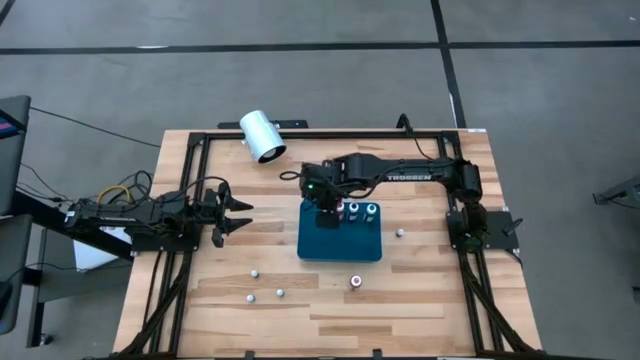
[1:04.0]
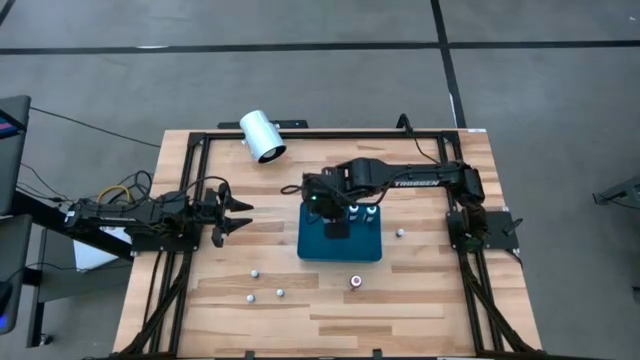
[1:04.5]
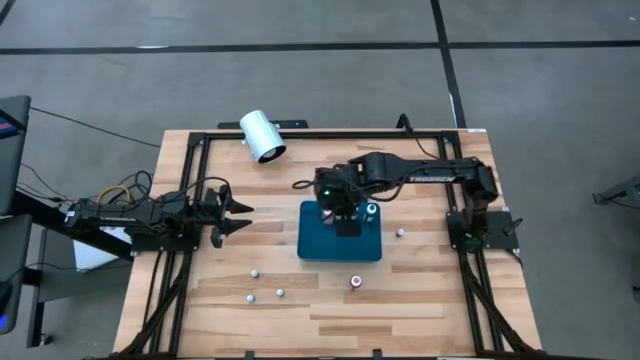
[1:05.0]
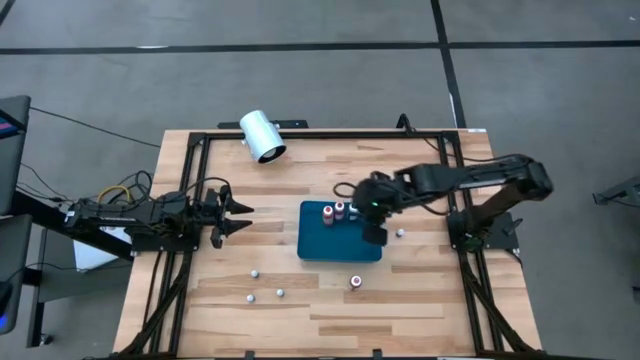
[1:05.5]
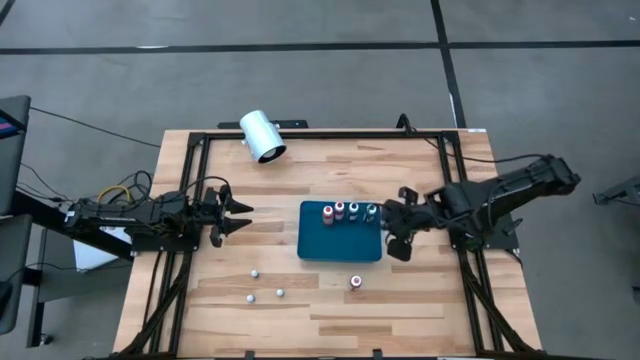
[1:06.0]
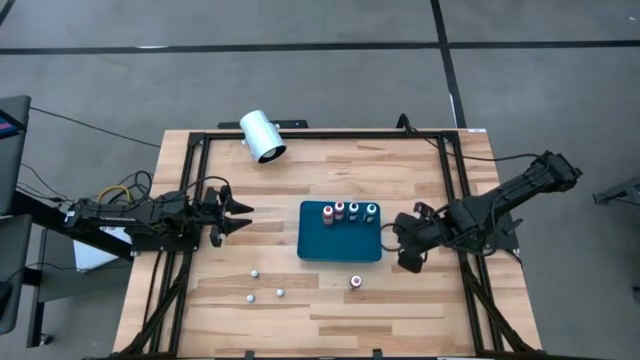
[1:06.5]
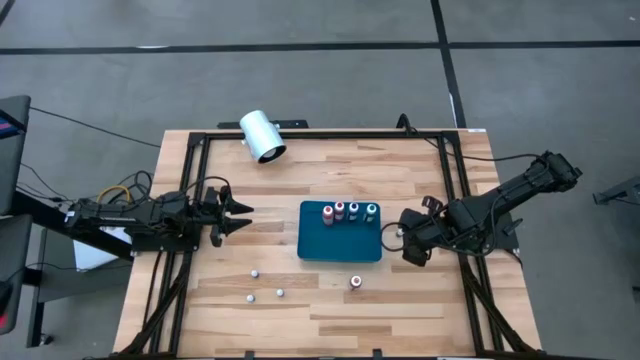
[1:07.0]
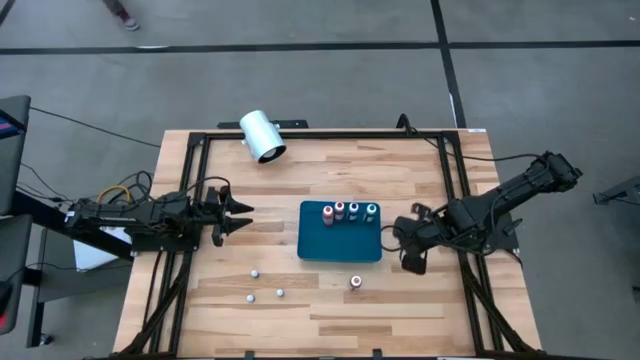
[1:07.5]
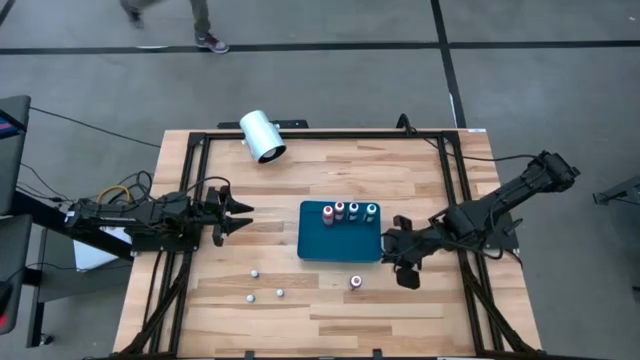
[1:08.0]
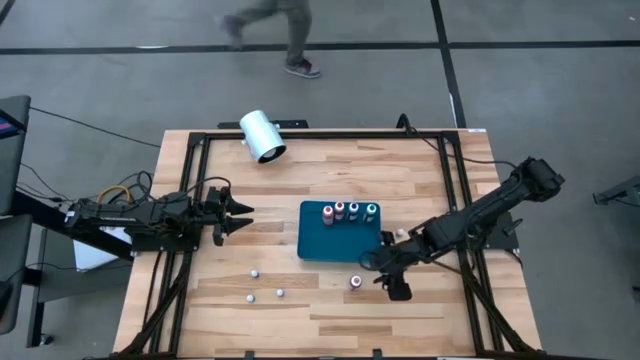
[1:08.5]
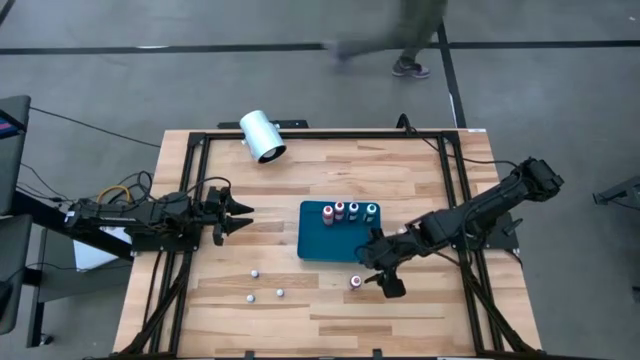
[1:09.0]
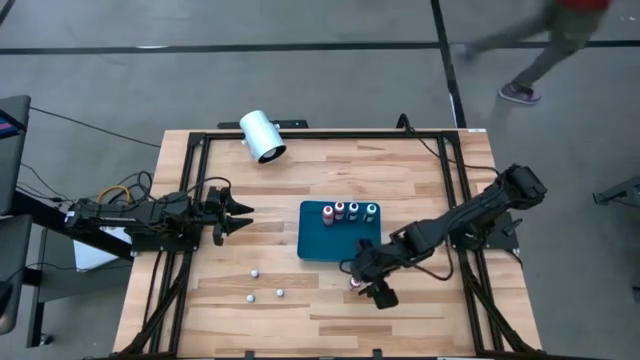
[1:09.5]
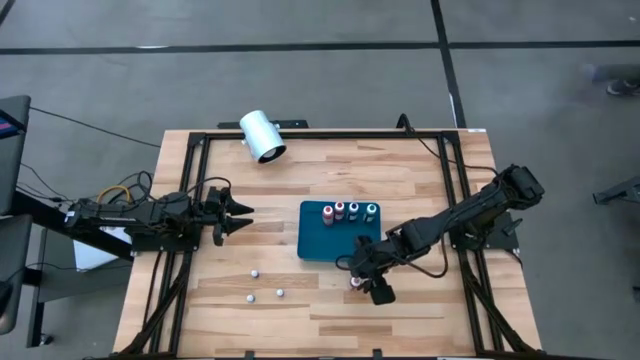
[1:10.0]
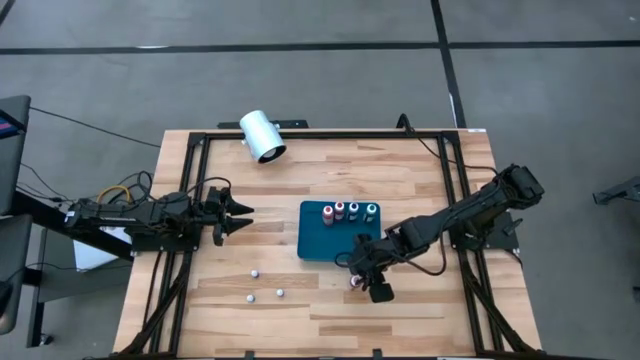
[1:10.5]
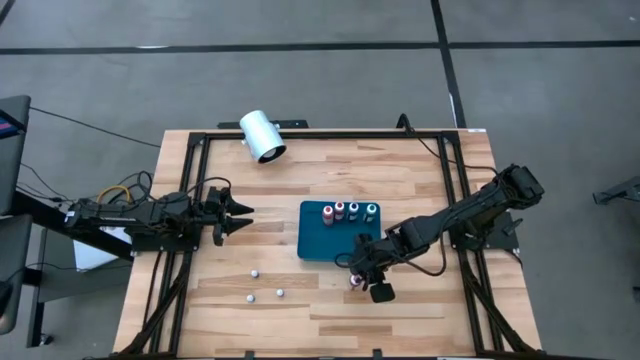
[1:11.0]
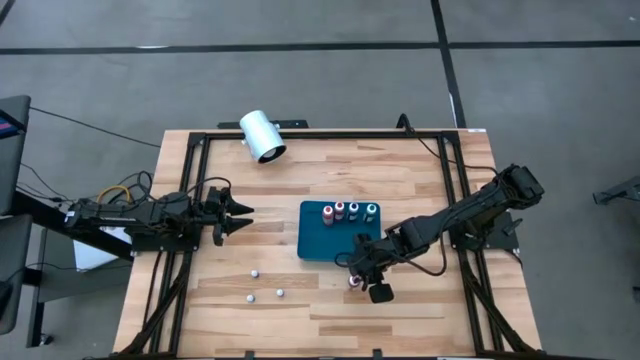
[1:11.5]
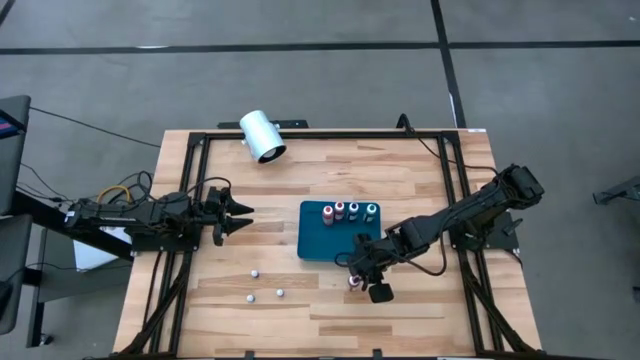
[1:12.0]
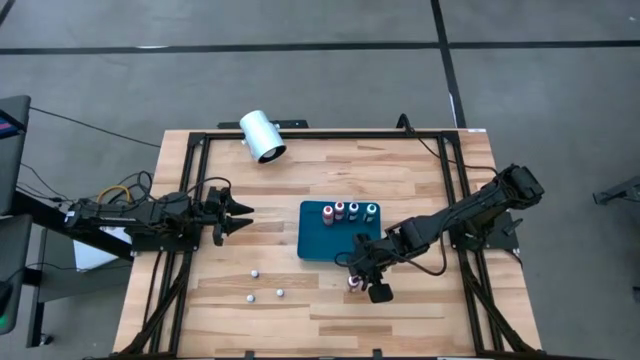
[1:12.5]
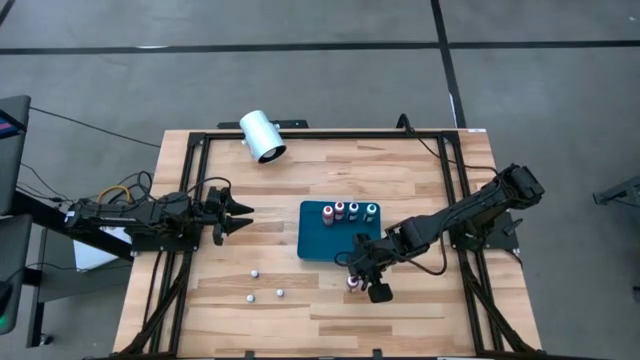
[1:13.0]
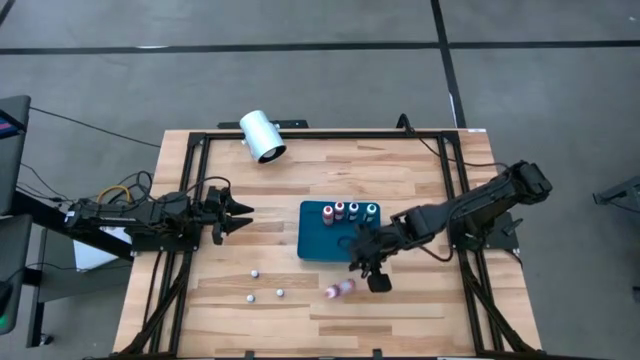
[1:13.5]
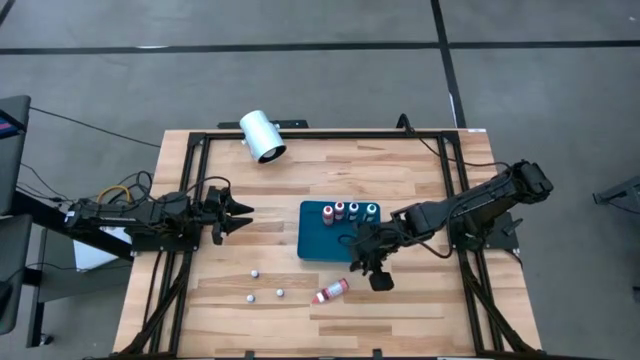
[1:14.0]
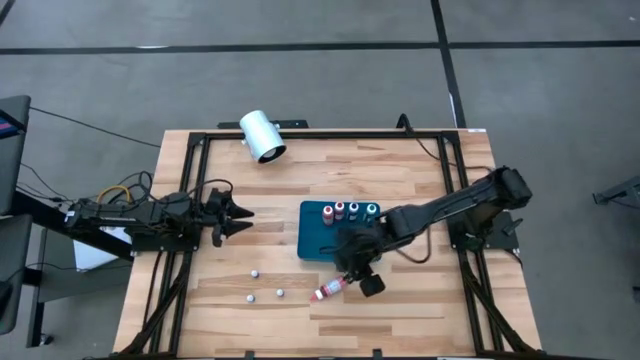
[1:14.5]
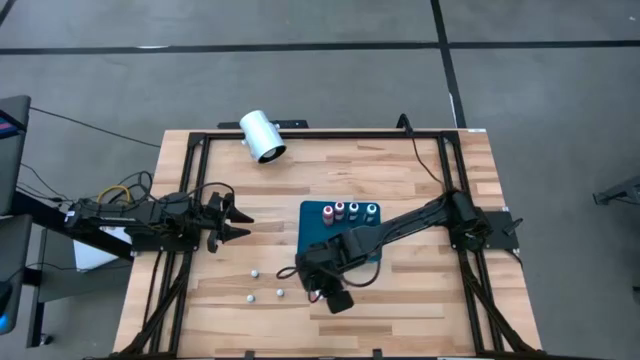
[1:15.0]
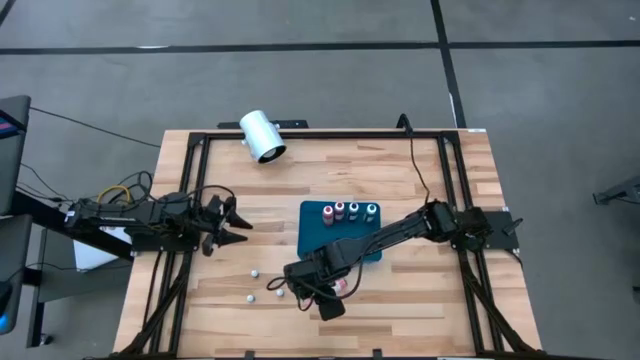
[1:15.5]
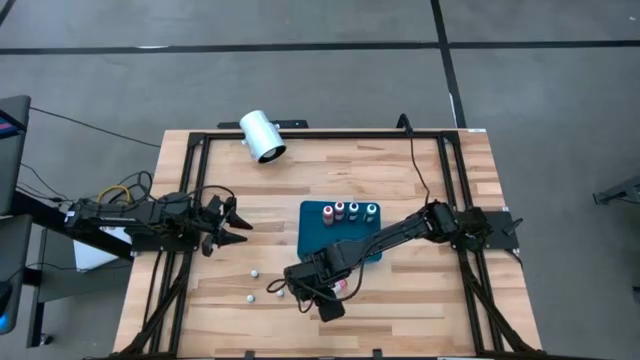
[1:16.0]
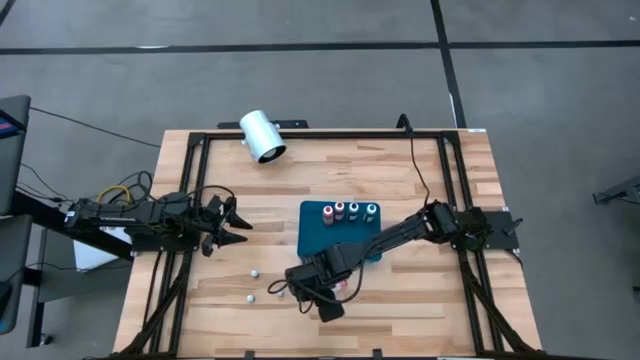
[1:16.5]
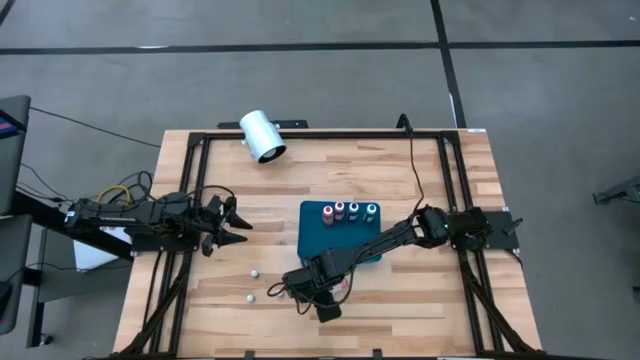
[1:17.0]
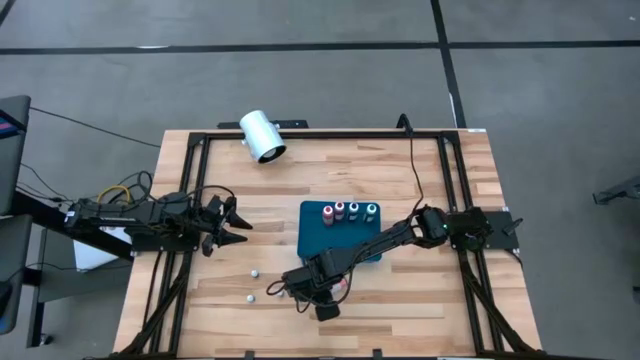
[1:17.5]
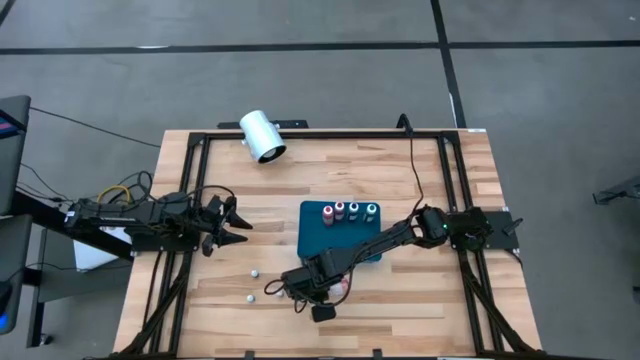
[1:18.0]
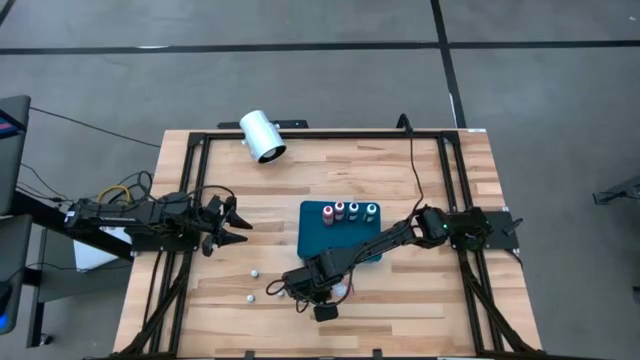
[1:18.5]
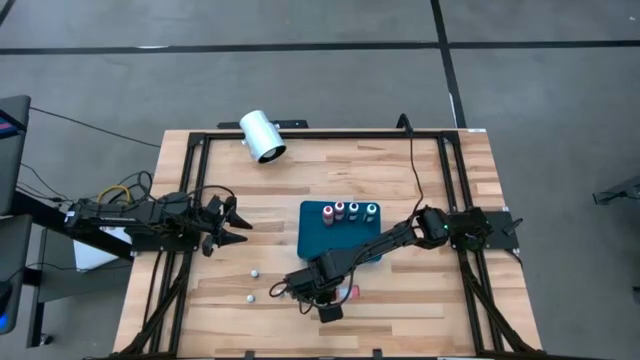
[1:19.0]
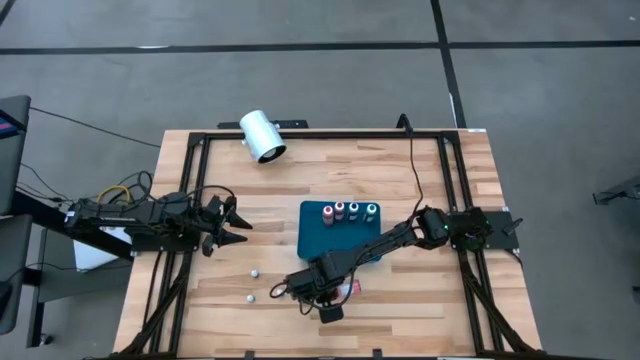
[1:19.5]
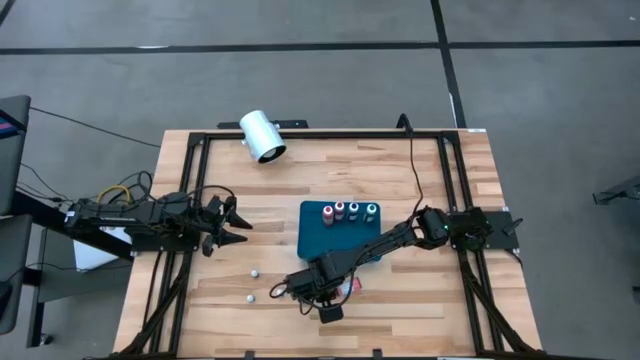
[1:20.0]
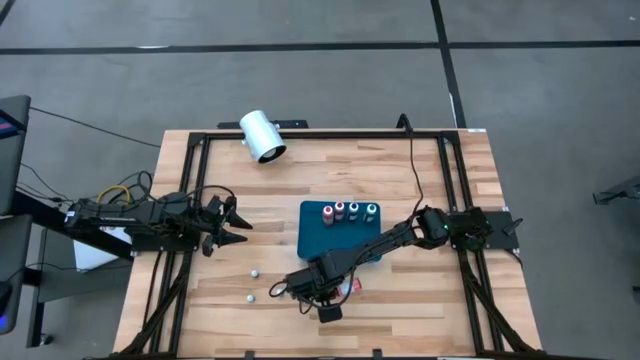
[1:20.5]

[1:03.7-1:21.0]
Task: Pick & Place food coloring
Put the large pink food coloring bottle into the blue bin

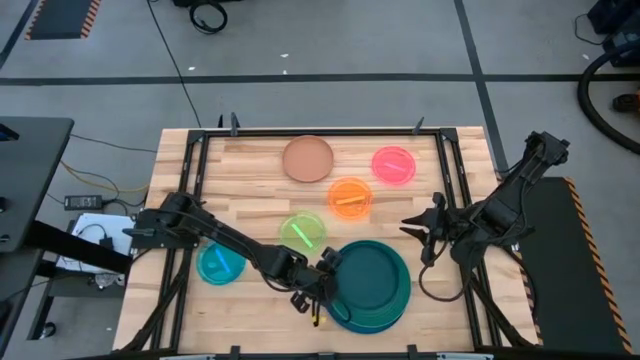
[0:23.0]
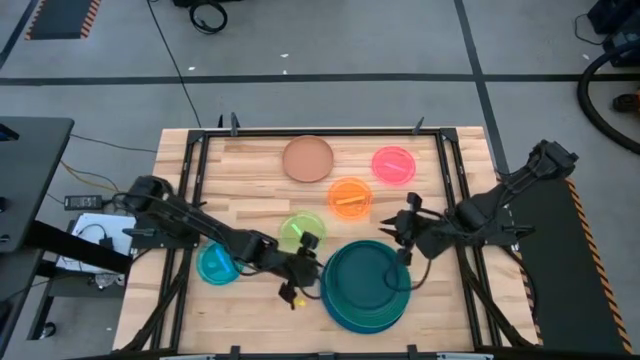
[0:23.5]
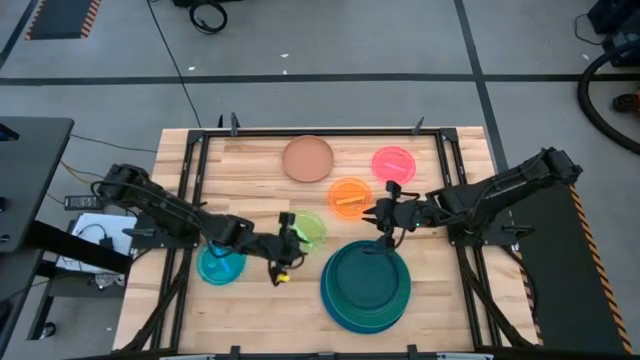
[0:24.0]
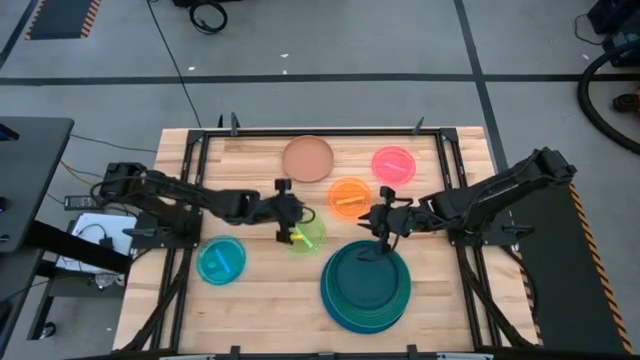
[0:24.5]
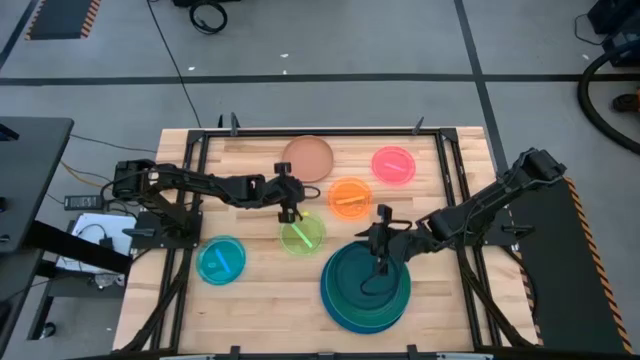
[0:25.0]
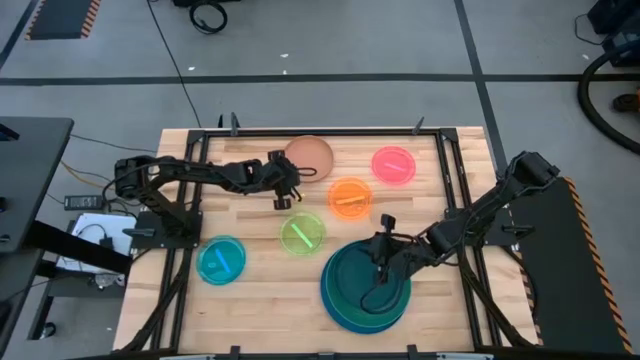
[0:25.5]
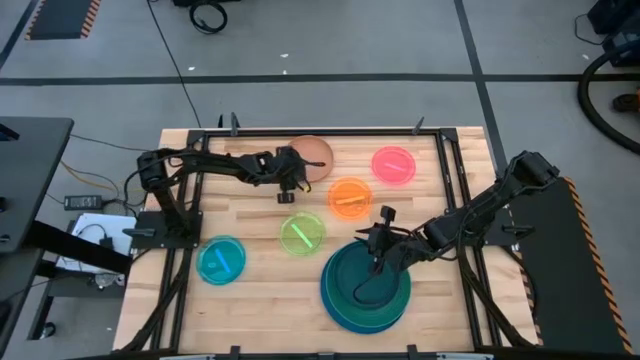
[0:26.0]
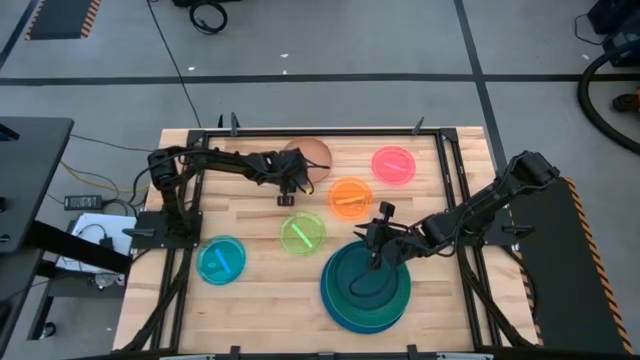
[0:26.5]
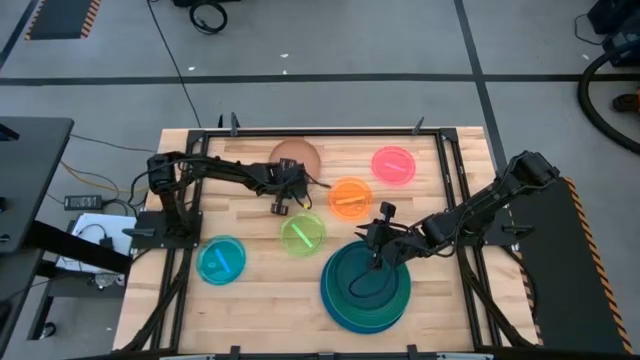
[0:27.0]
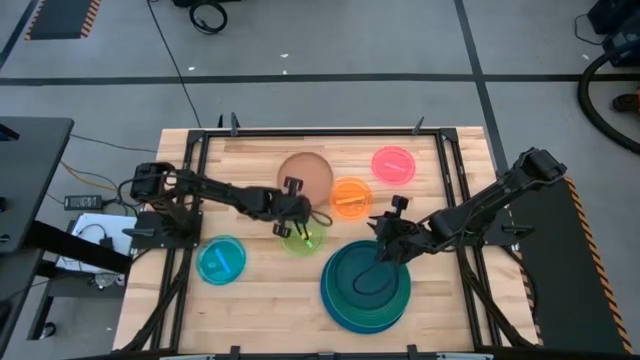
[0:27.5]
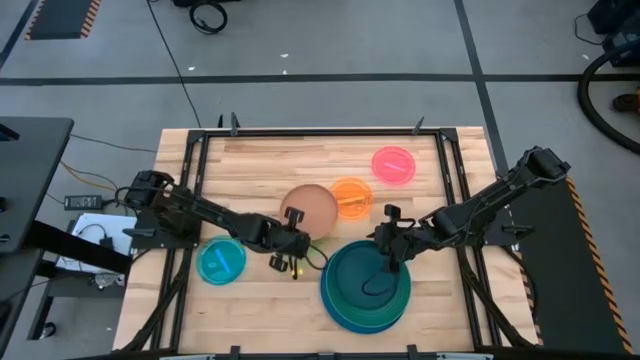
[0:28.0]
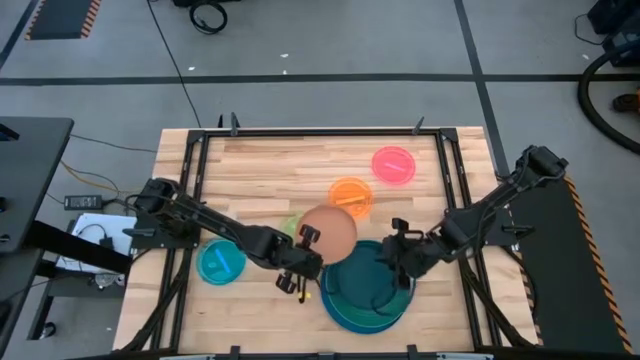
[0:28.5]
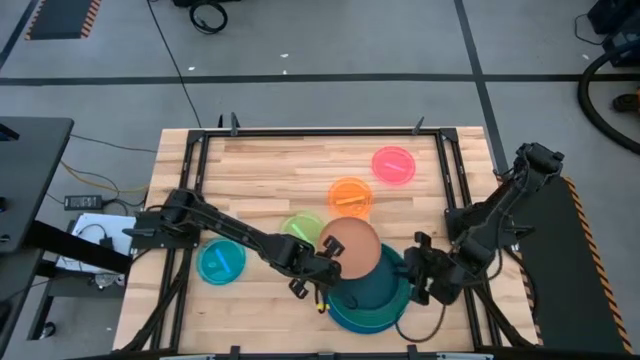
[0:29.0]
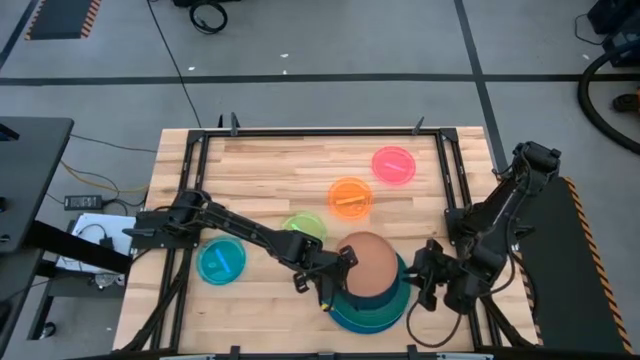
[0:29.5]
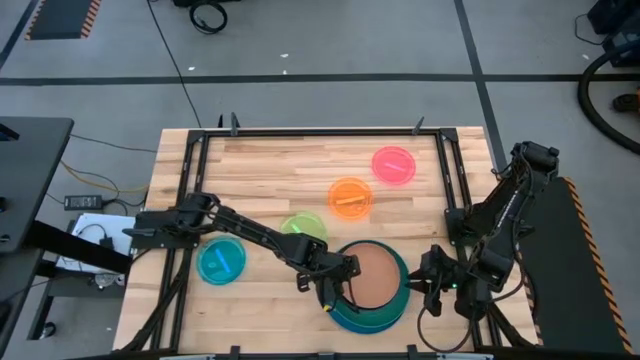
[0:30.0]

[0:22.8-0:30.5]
Task: Stack plastic plates
Stack the brown plate on the top of the dark blue plate
